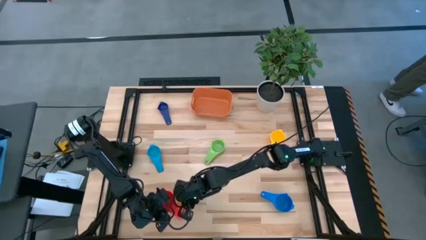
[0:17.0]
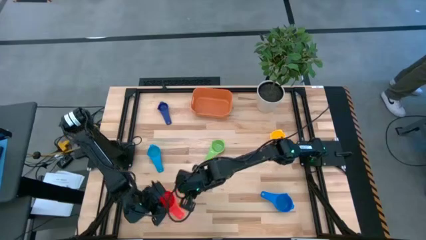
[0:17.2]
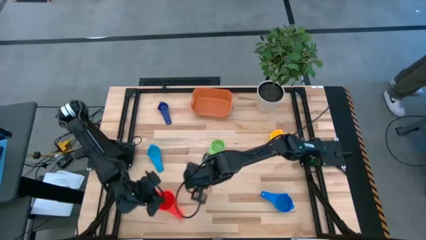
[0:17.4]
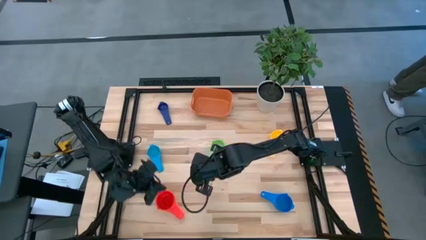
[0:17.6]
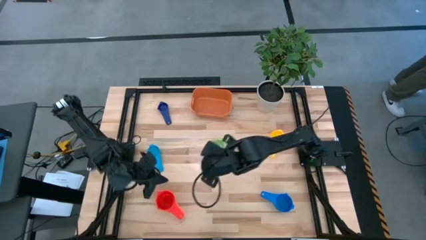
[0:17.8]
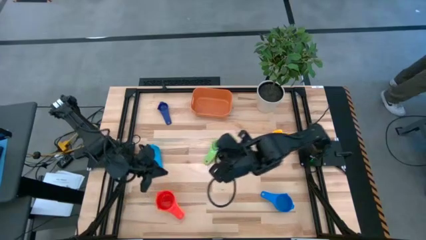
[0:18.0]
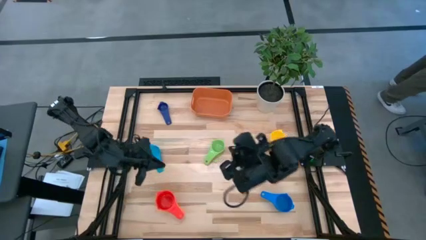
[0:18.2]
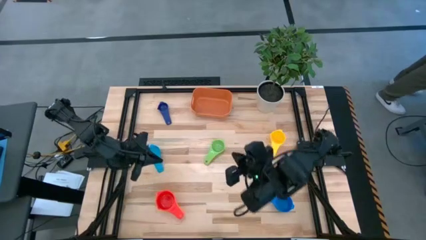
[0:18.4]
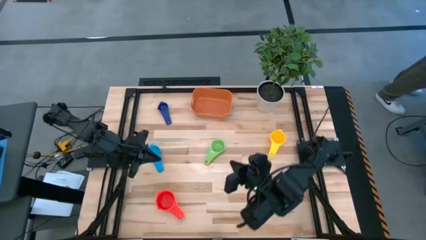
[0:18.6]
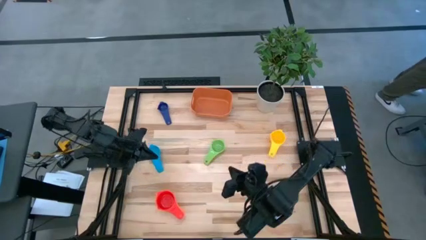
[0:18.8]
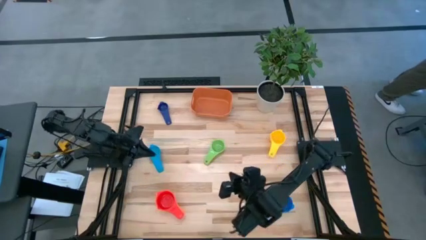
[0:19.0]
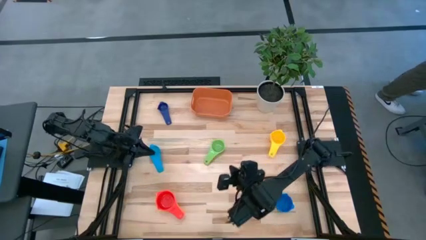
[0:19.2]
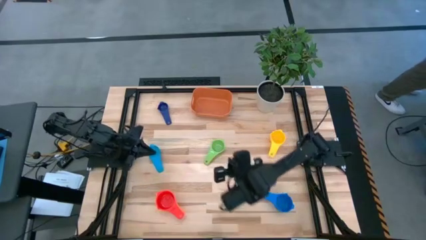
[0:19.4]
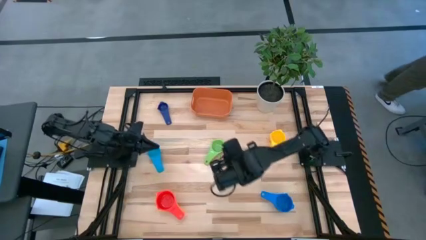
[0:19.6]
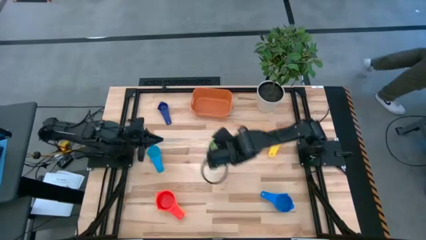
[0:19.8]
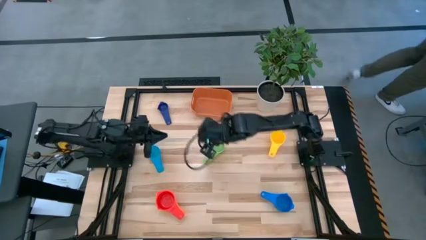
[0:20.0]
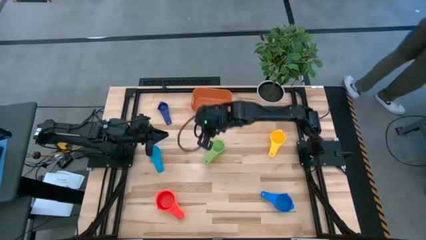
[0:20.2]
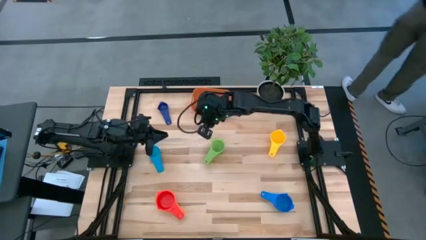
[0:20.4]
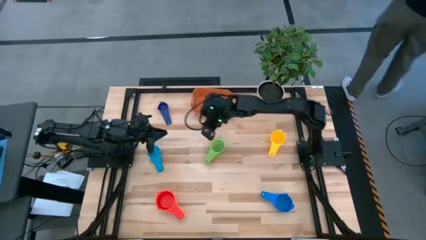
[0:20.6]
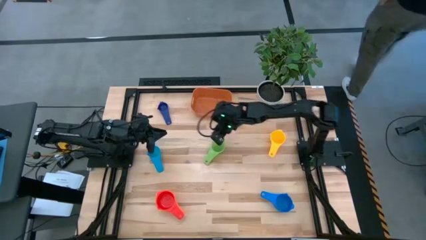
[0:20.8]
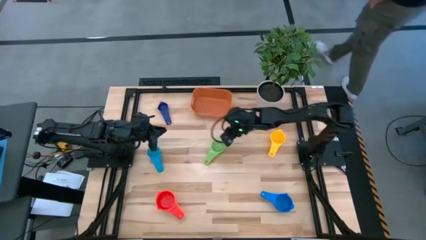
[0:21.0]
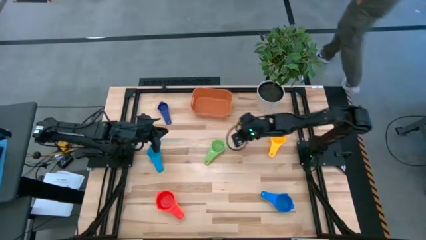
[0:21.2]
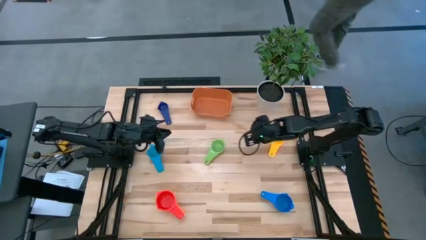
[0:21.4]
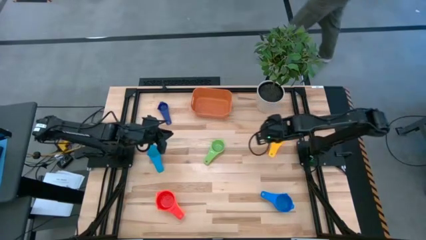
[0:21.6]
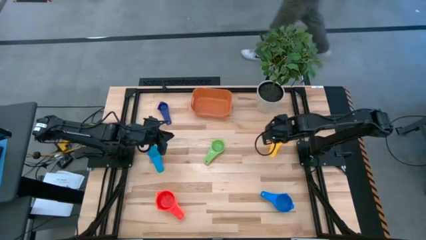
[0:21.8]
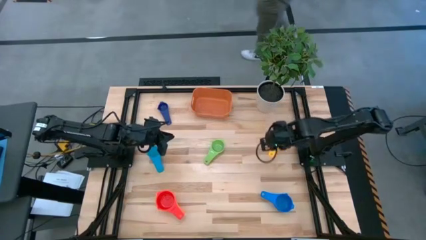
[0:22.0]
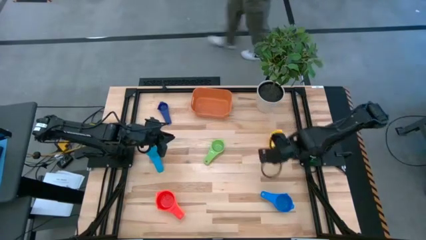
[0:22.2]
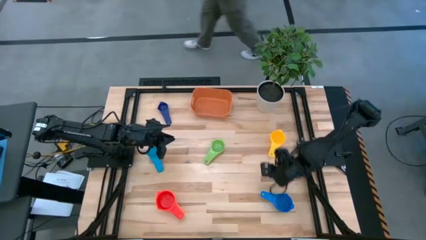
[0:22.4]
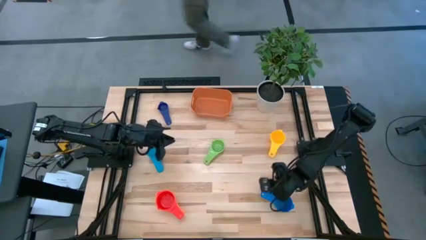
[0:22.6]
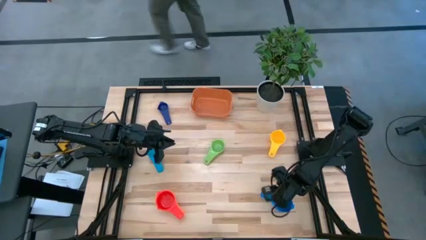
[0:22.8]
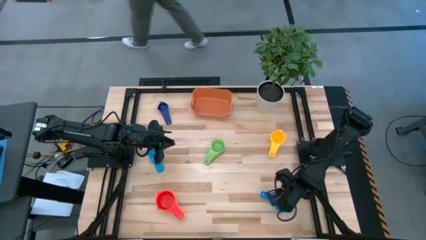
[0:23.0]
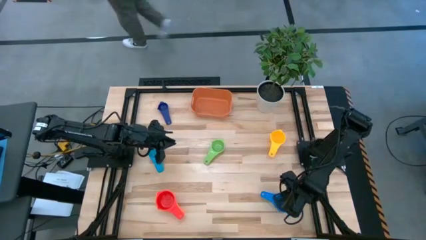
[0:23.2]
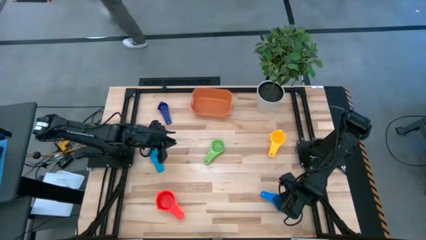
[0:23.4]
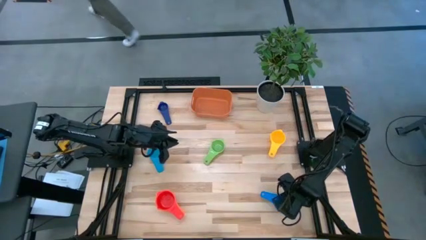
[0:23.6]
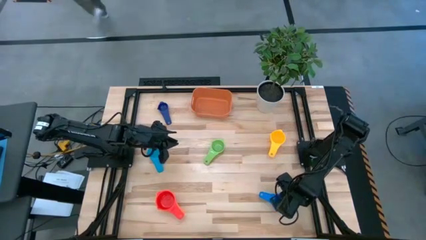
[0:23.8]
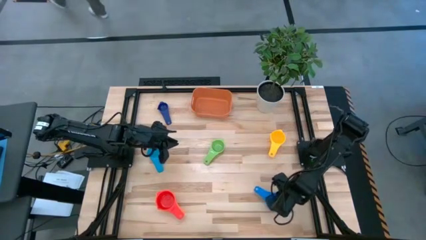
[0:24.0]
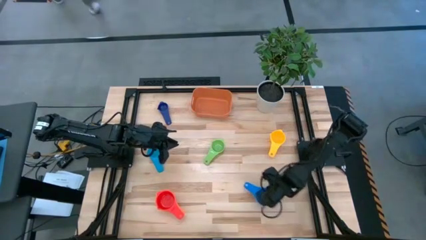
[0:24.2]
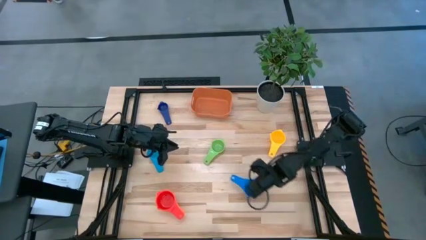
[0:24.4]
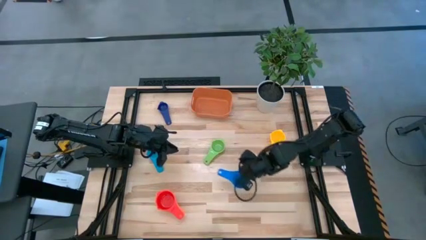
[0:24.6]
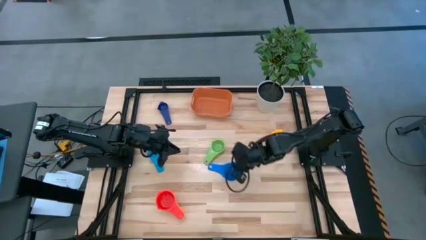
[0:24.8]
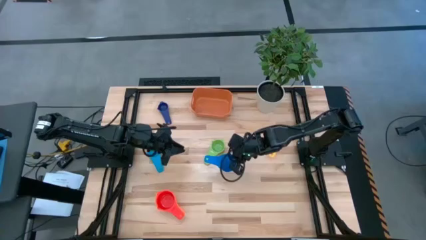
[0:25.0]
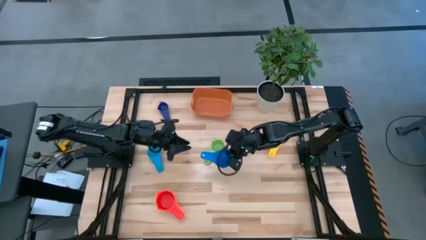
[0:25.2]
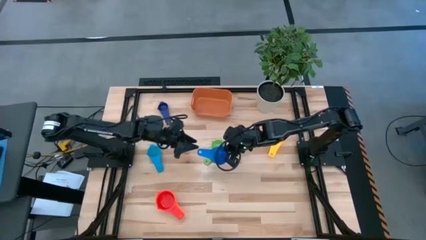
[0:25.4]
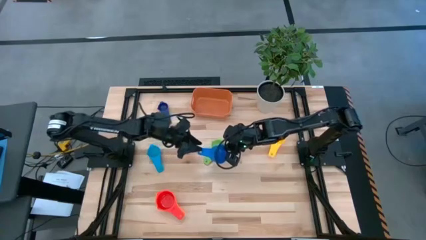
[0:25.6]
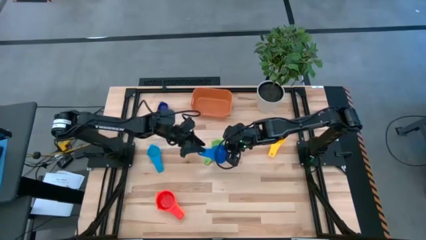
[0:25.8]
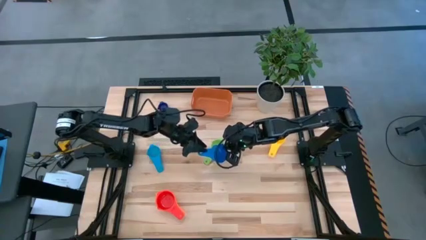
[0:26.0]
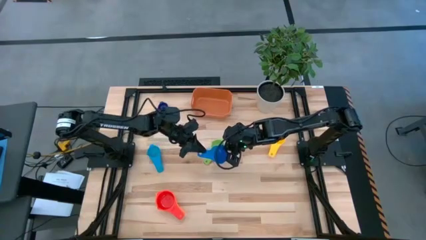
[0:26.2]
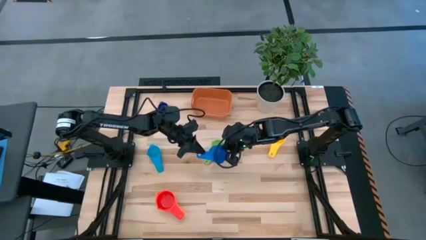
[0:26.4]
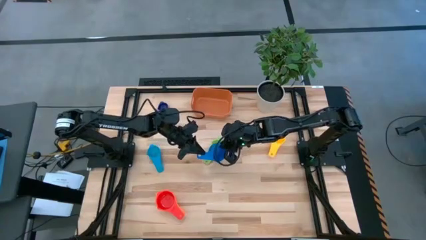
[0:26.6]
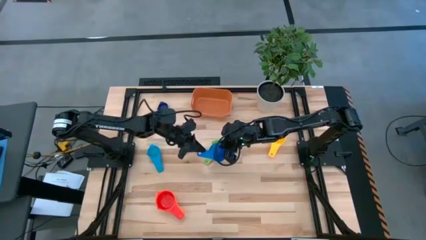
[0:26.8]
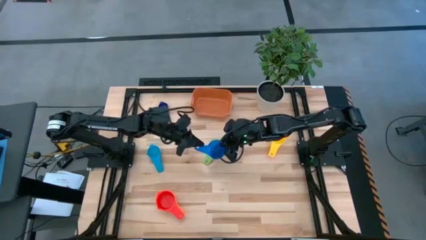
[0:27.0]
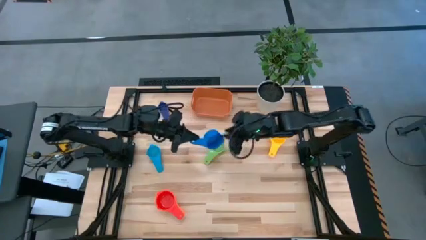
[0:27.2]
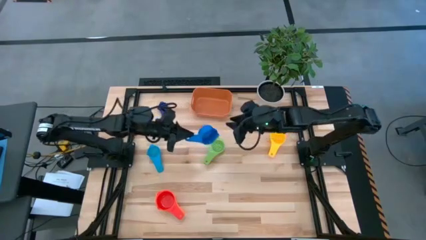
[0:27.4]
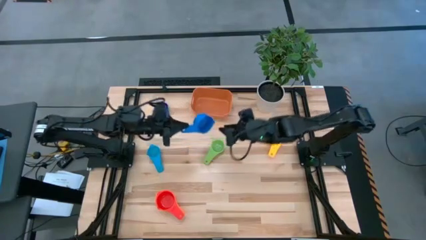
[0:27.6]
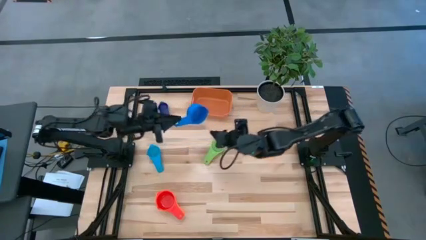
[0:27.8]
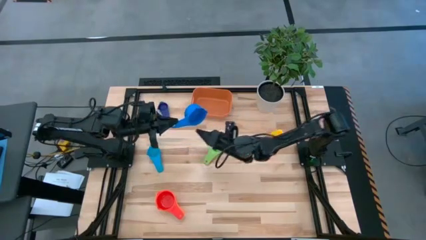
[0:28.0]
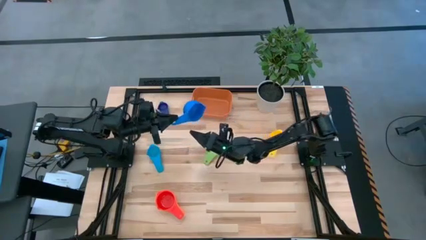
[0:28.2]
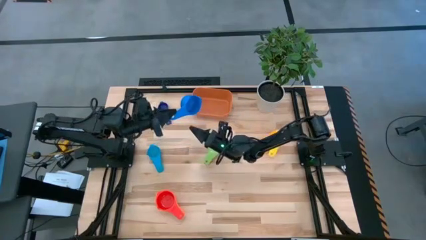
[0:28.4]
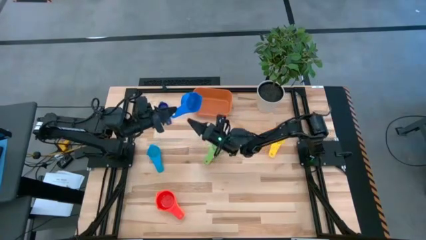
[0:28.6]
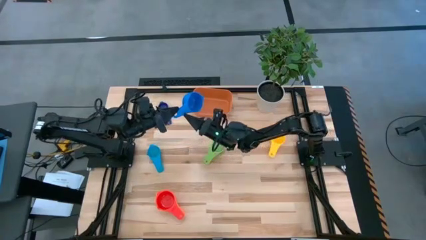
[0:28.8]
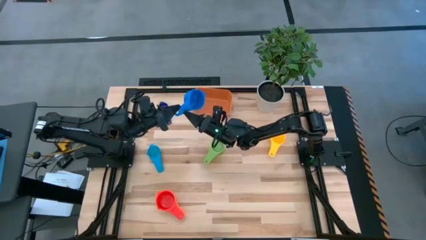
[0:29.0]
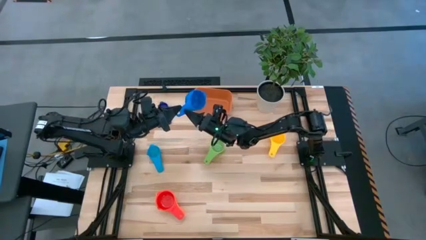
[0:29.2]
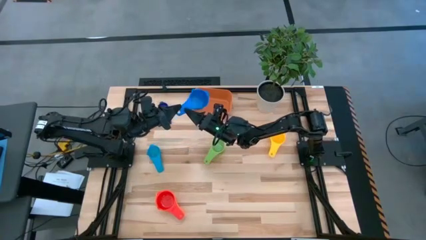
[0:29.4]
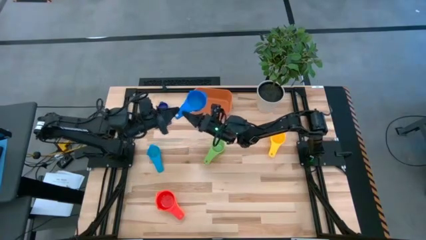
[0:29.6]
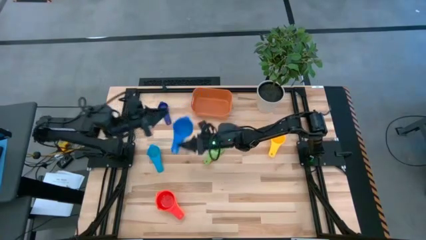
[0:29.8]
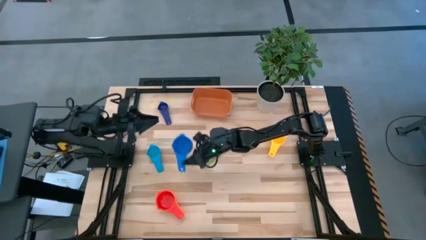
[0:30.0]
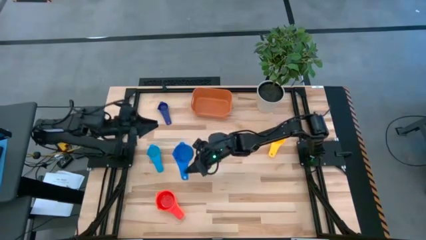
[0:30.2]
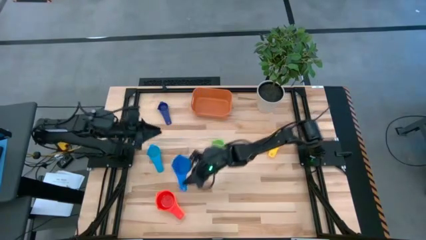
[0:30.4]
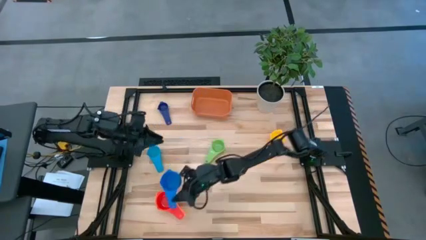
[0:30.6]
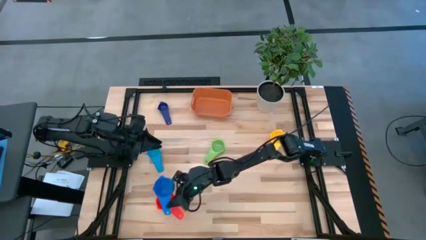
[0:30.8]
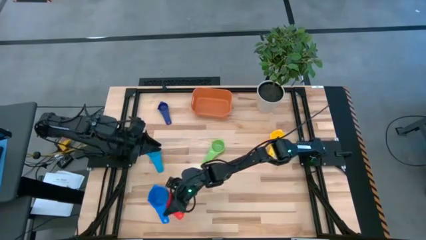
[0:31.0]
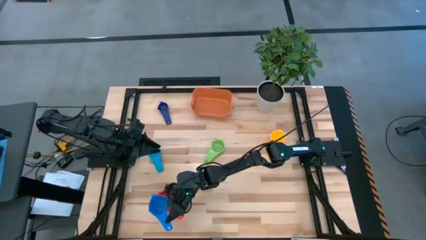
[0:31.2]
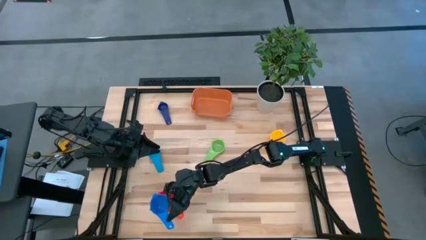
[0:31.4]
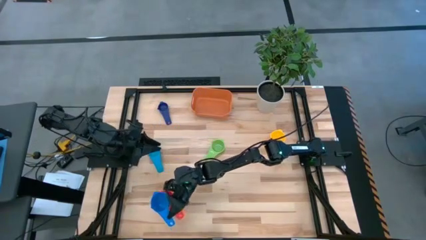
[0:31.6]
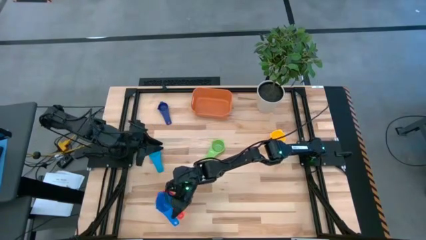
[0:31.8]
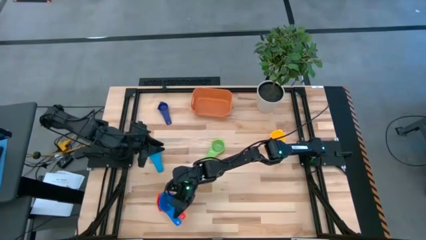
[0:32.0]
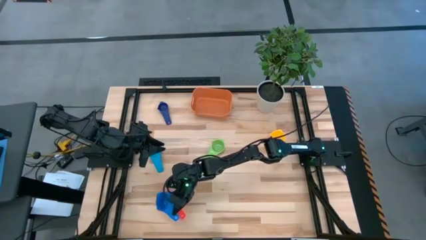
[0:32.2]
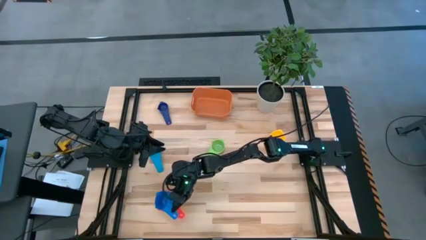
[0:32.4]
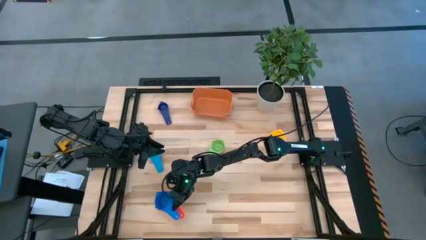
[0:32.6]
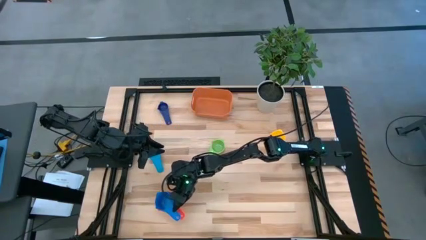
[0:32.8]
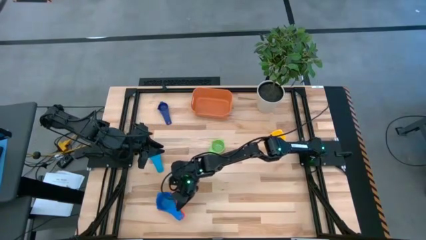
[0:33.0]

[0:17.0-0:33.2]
Task: Nest measuring cups in basket
Stack the blue measuring cup on top of the red measuring cup
